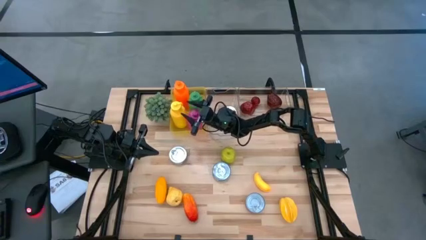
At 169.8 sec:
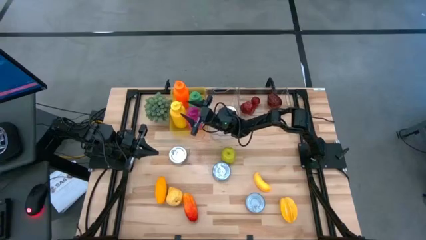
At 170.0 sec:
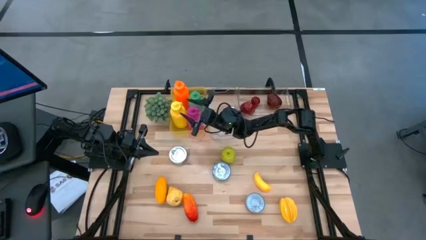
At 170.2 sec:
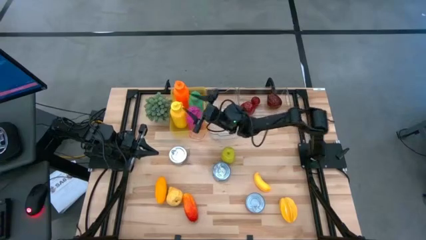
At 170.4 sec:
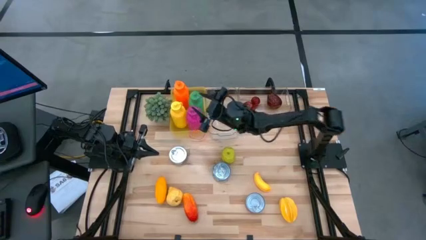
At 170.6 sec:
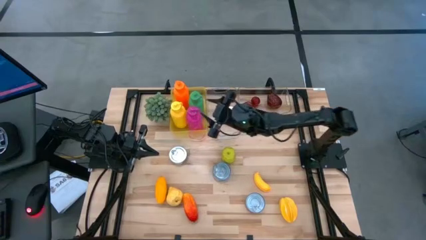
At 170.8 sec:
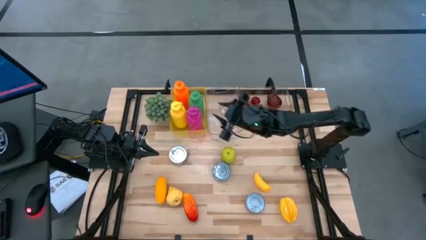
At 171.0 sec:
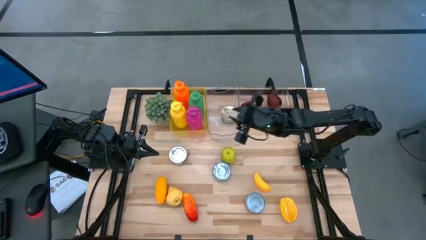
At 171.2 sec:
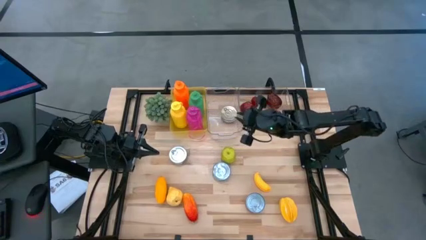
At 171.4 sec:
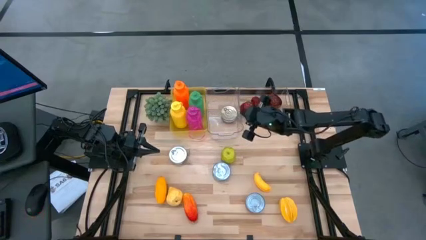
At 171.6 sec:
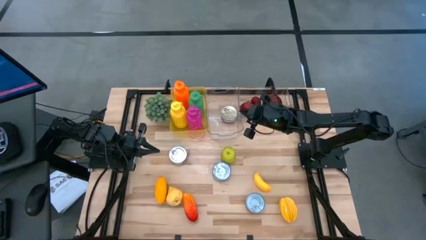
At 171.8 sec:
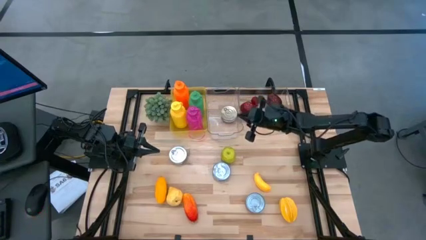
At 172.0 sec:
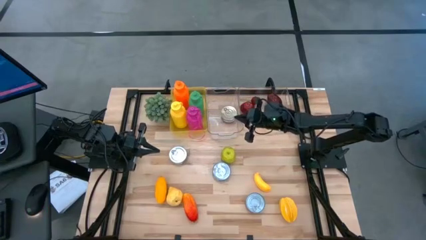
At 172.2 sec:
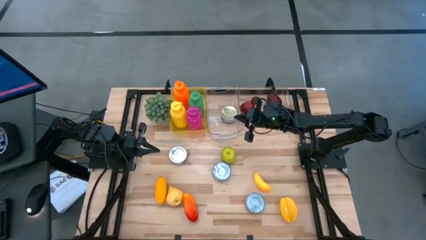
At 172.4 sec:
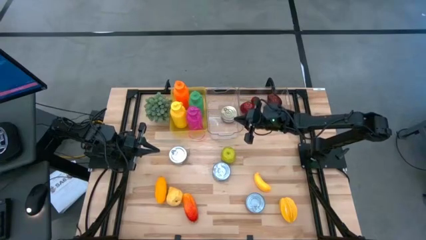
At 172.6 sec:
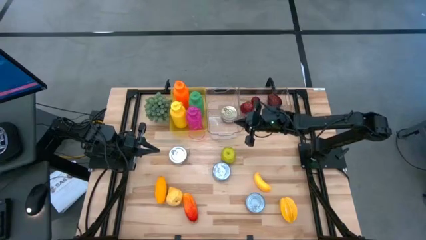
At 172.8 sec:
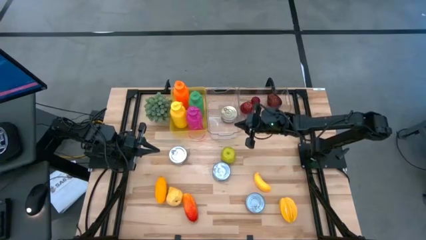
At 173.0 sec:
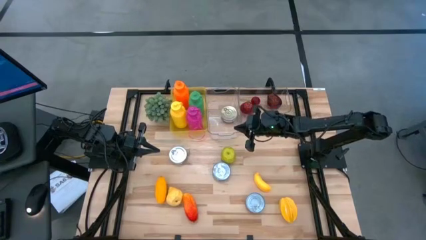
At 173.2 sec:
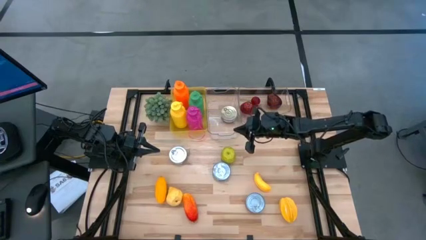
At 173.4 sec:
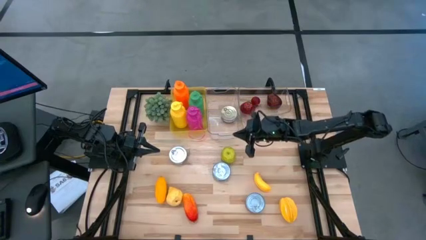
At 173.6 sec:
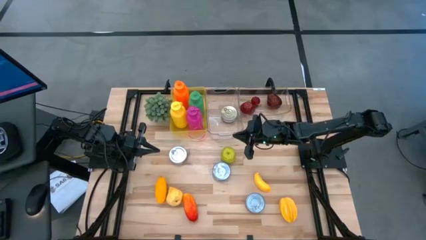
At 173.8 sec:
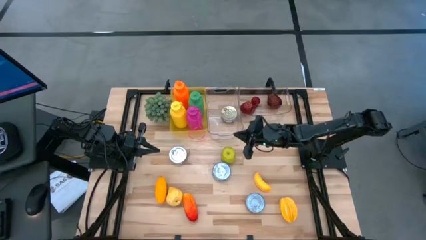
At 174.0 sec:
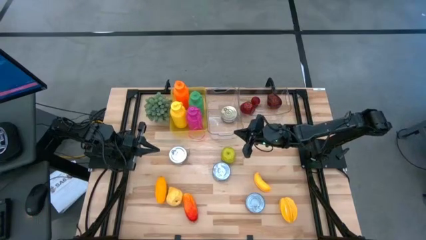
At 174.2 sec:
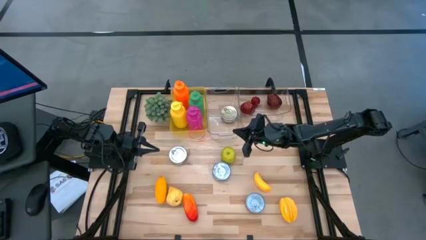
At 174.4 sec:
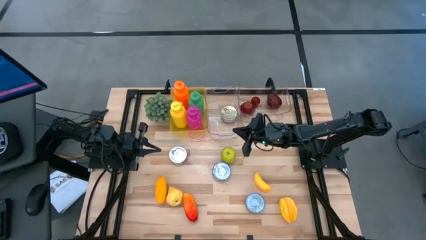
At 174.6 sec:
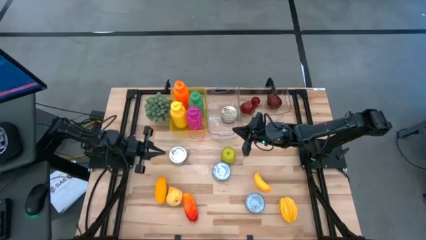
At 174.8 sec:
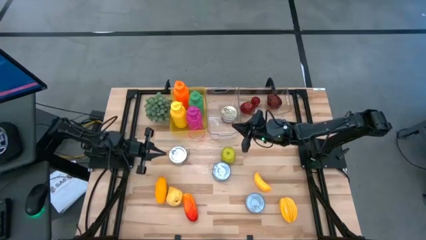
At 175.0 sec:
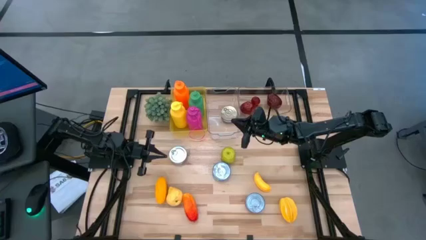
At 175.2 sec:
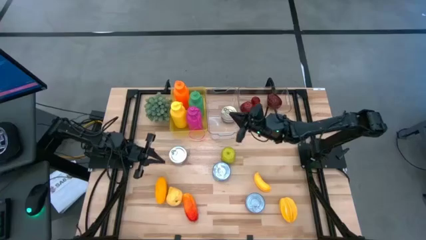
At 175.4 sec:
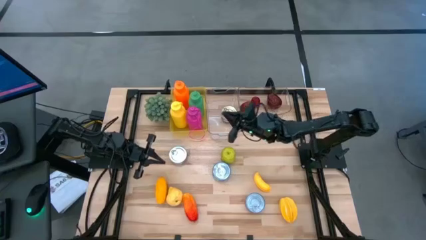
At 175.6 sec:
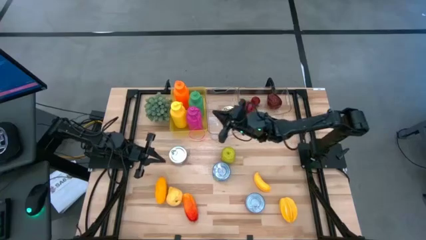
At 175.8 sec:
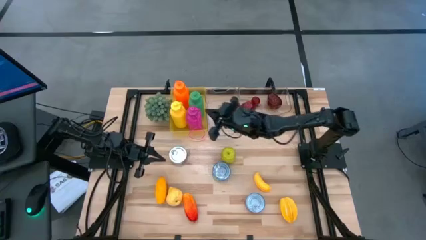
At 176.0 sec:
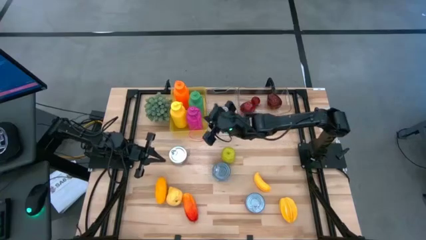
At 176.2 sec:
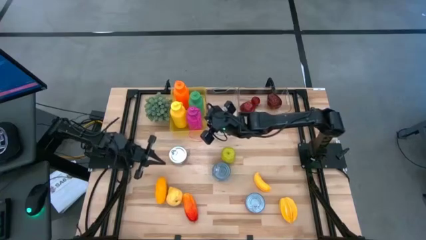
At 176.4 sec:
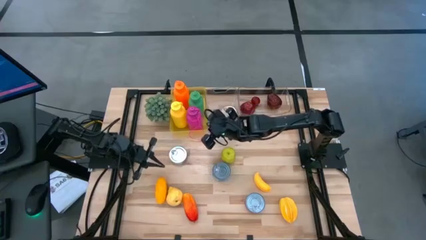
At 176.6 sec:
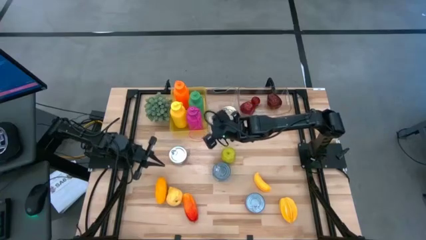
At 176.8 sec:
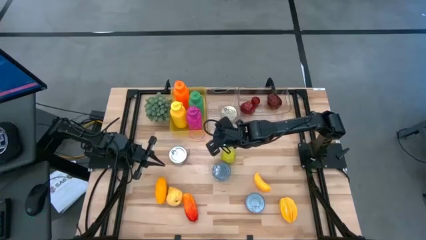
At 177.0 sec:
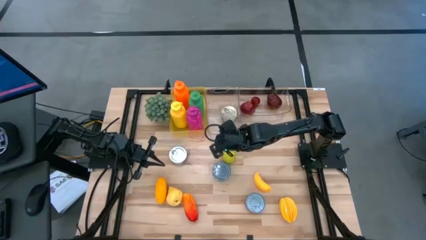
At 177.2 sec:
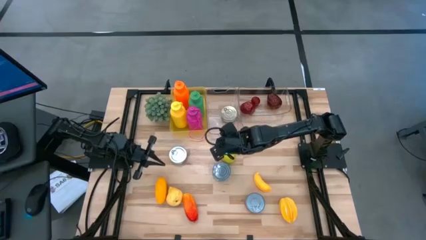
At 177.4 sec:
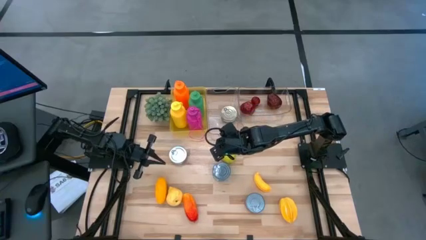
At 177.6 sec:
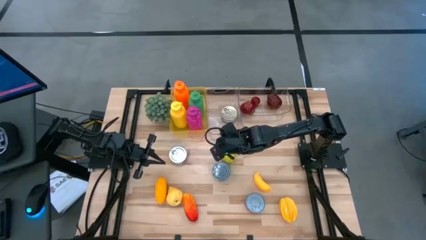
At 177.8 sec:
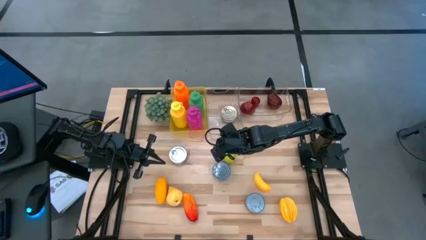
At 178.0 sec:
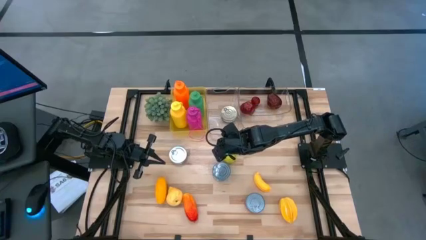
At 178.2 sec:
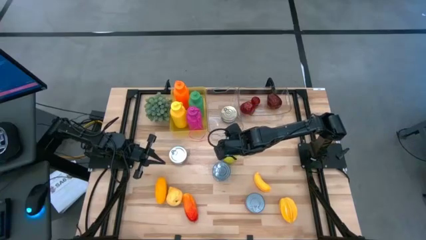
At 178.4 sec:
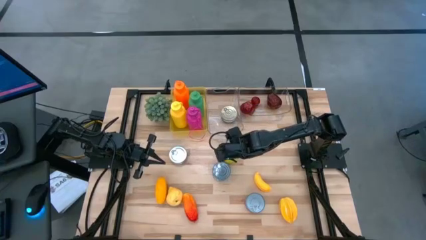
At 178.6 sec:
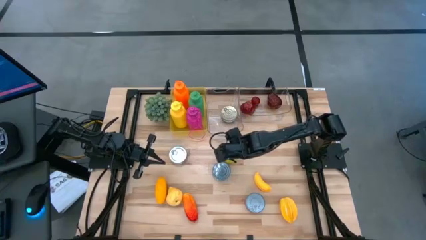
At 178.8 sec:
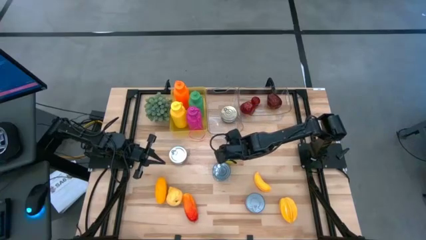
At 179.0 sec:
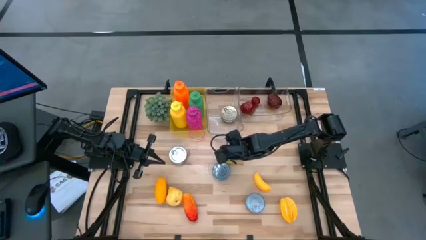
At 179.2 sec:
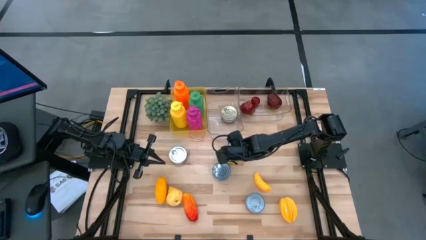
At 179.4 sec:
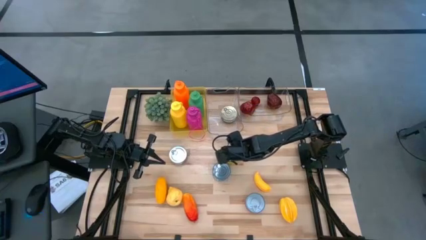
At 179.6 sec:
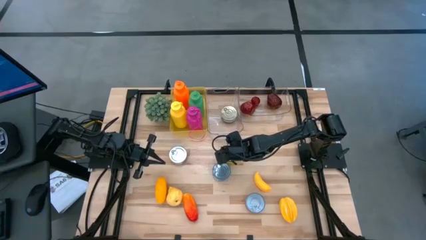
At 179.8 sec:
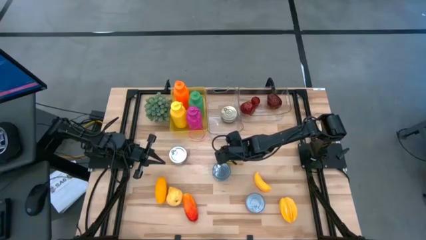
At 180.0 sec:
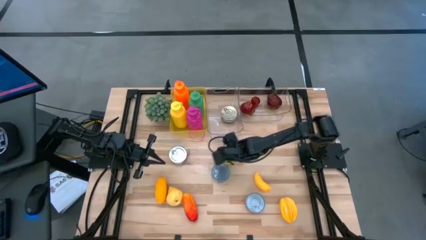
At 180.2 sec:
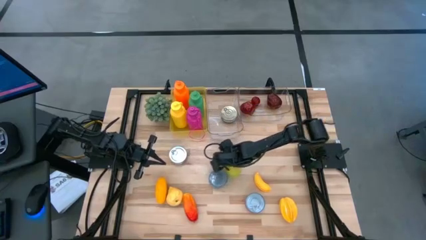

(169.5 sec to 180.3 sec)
Task: Pick & Place Food Item
Put the green apple into the right transparent bin

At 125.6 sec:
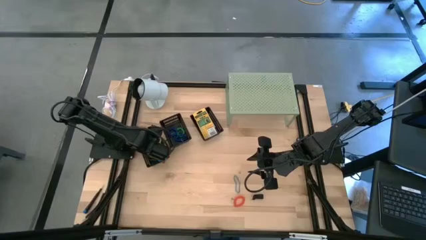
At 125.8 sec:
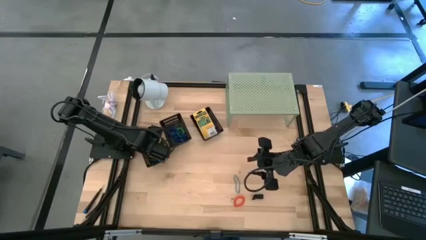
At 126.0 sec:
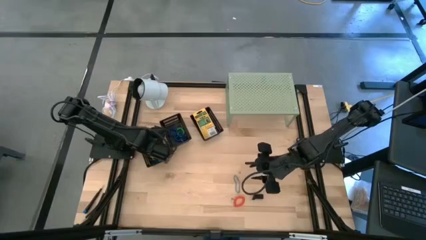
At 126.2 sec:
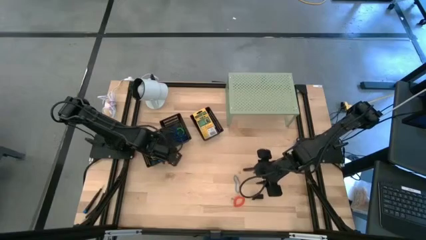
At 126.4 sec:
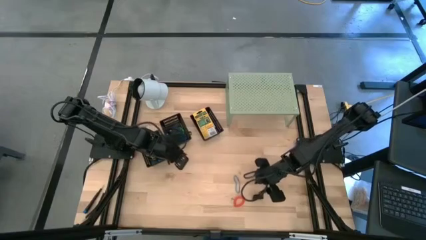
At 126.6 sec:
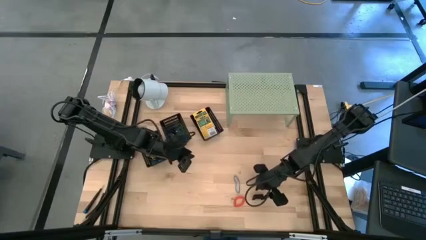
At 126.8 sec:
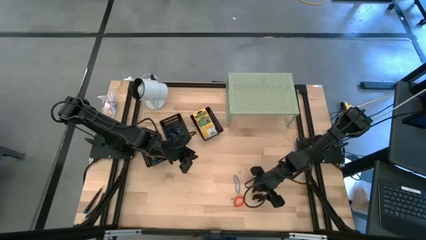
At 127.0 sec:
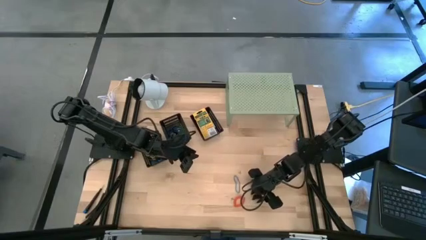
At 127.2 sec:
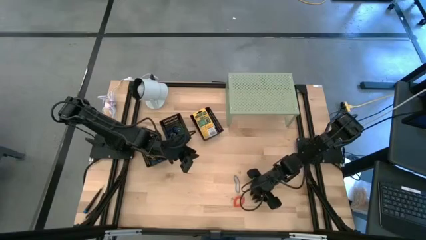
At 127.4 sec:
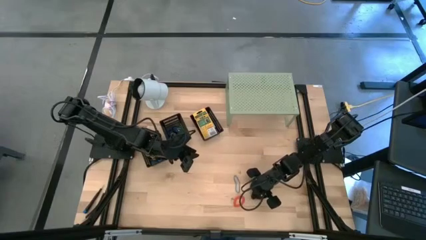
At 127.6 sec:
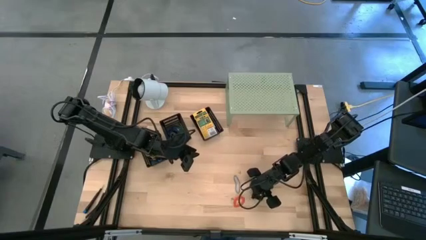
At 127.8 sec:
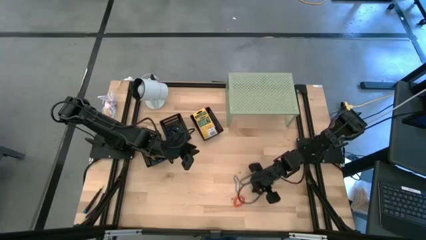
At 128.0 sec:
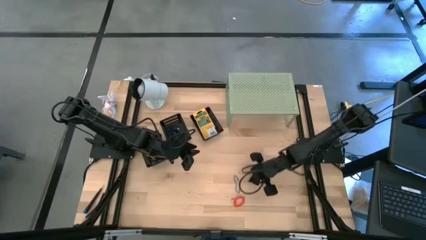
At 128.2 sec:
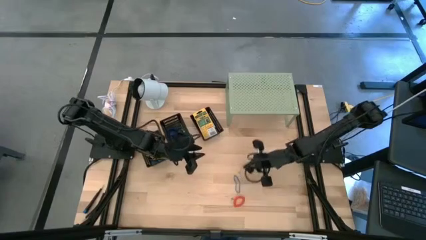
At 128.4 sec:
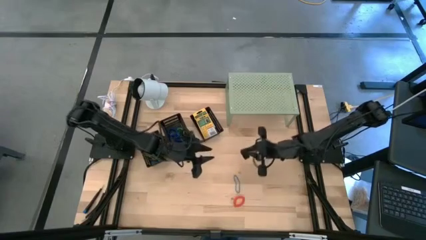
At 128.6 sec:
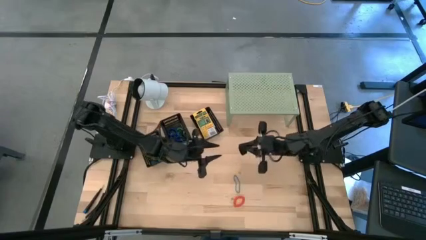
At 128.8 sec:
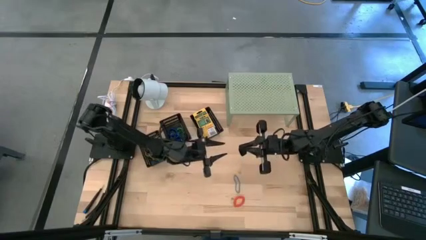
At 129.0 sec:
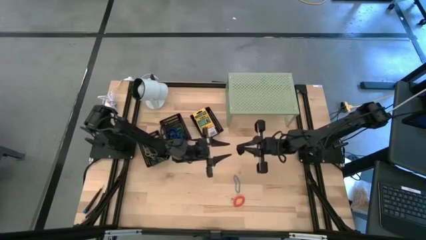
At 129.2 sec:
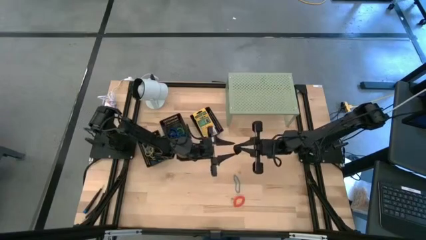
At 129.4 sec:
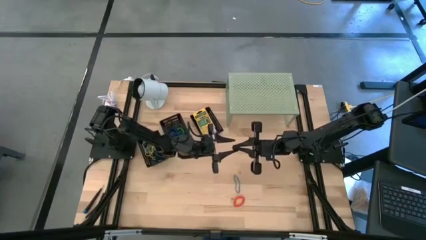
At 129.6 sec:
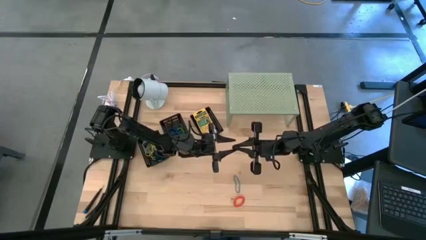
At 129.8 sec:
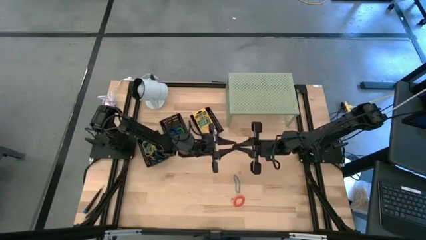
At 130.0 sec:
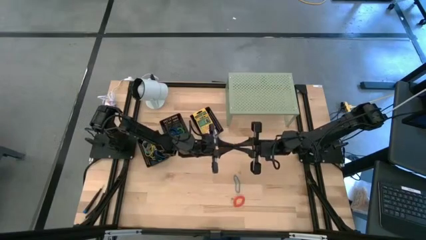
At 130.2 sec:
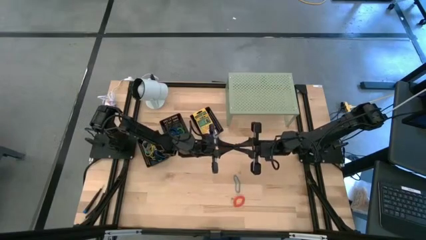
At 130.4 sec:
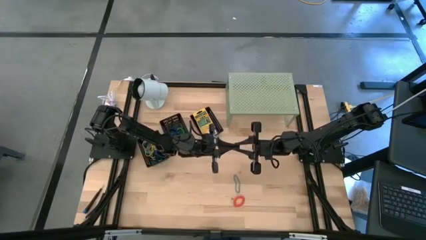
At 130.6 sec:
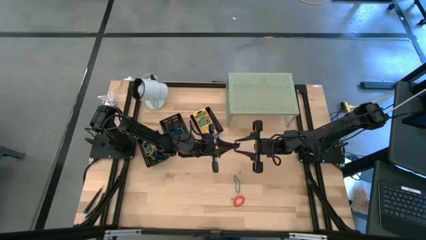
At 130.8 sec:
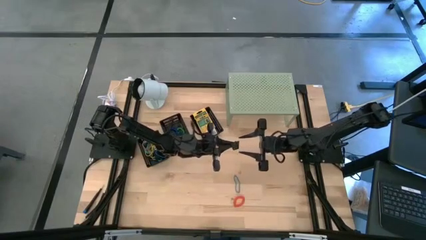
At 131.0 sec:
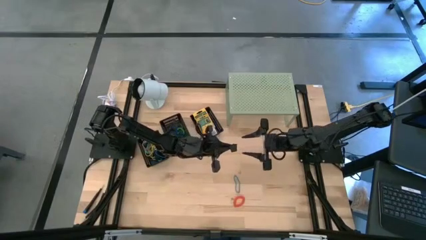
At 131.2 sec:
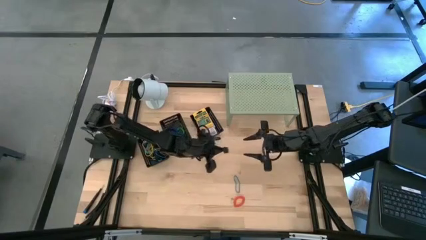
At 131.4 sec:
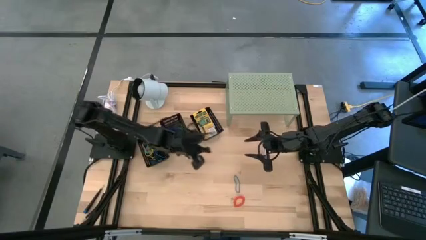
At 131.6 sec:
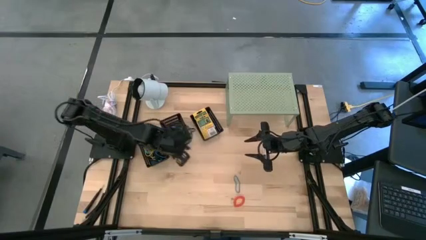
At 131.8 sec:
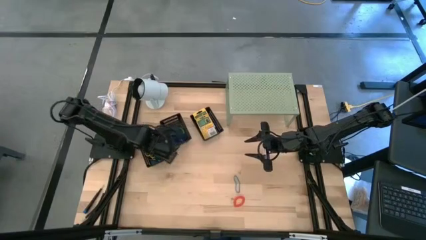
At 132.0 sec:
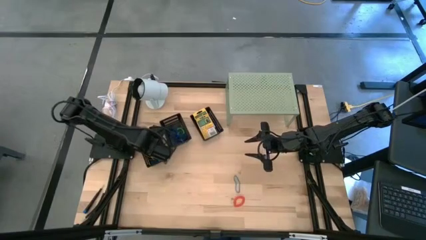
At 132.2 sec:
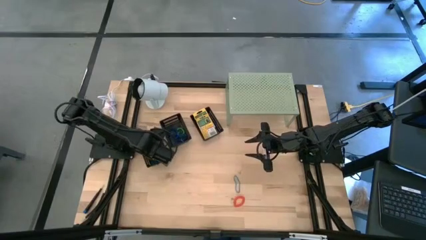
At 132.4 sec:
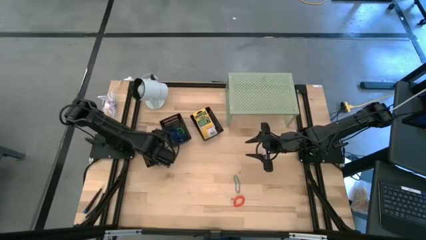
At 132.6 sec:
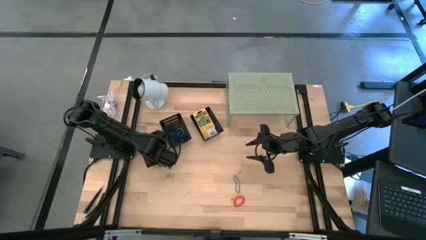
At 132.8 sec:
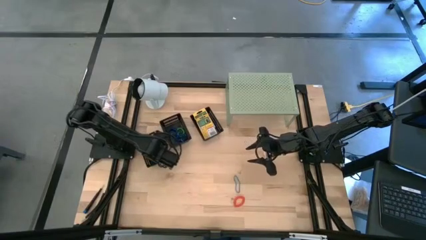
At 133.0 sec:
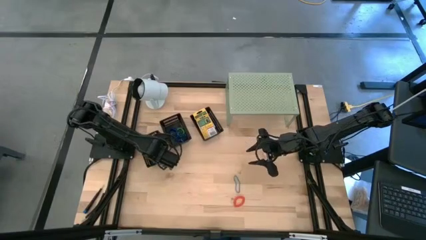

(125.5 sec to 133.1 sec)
Task: Pick & Place Office Desk Supplies
Put the black rubber band into the left black basket
